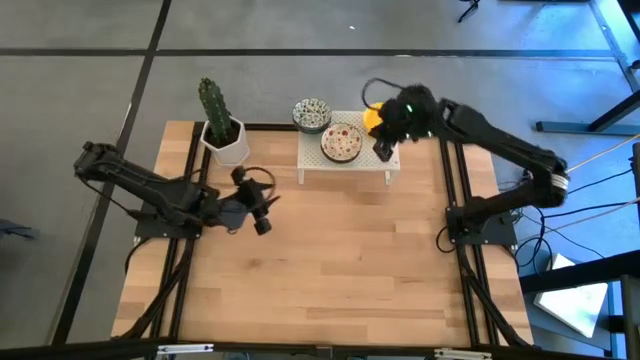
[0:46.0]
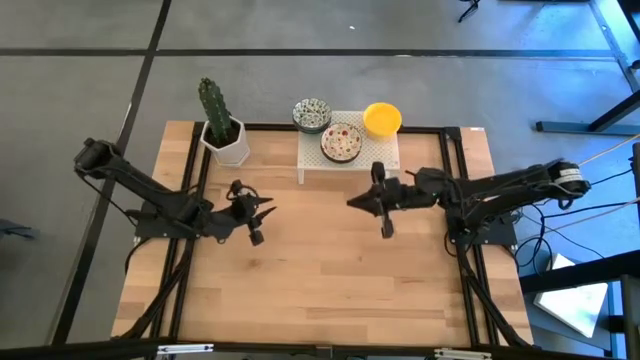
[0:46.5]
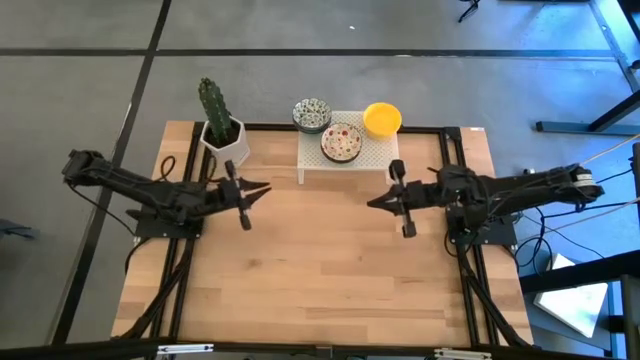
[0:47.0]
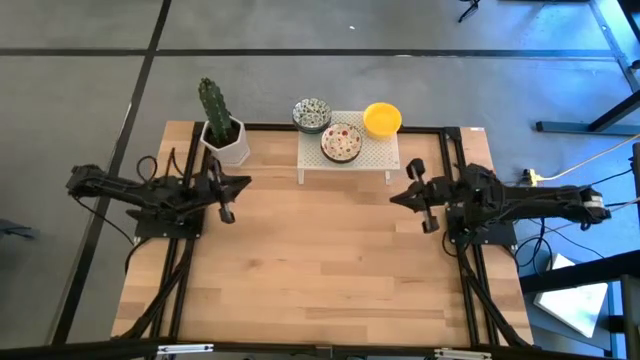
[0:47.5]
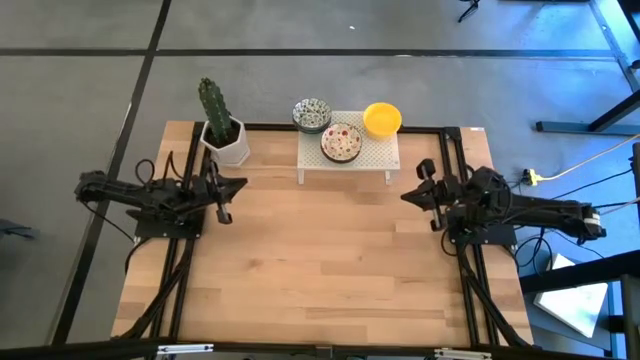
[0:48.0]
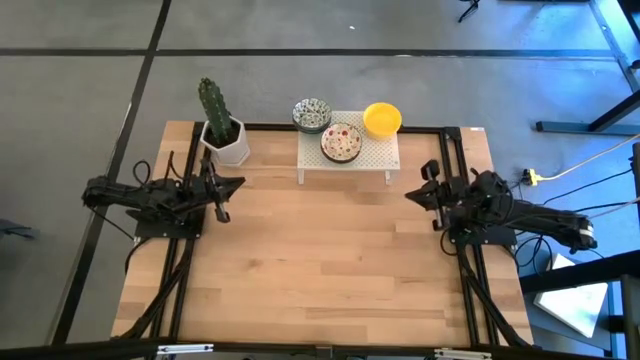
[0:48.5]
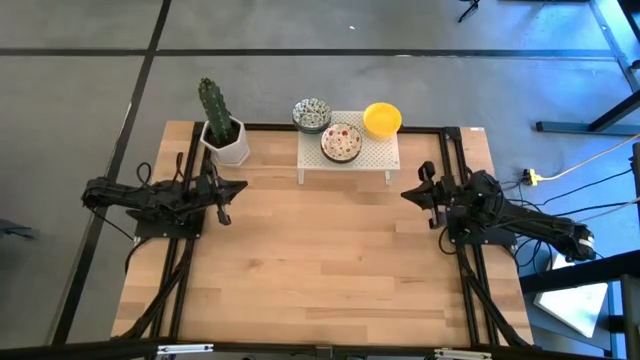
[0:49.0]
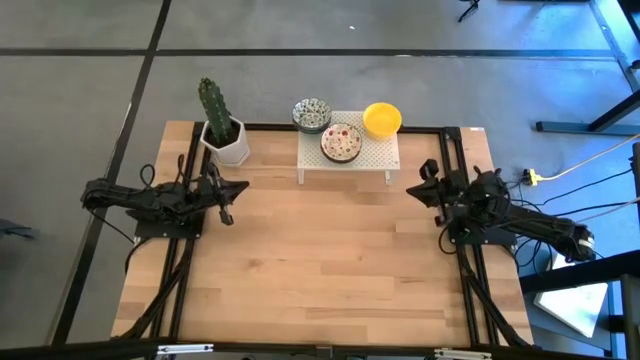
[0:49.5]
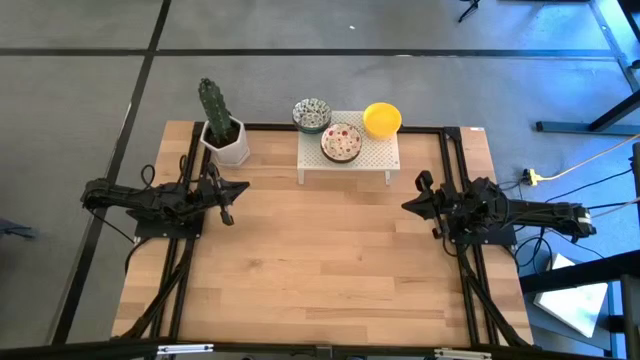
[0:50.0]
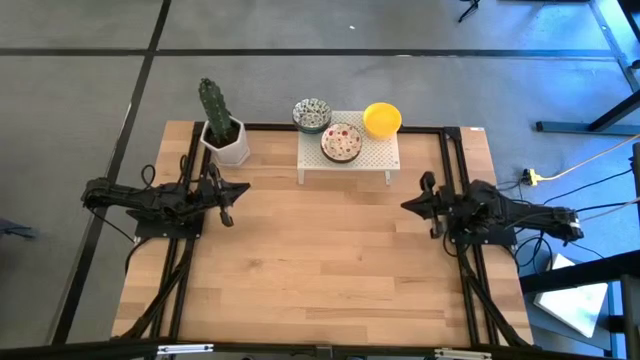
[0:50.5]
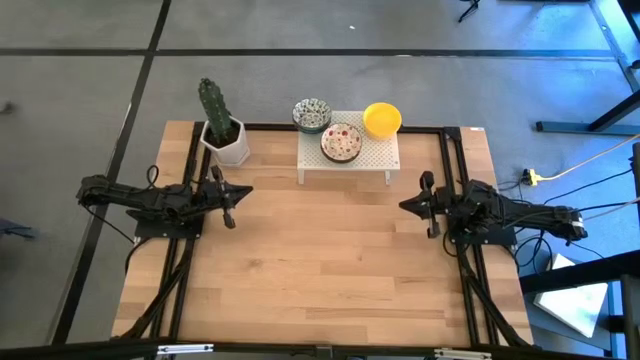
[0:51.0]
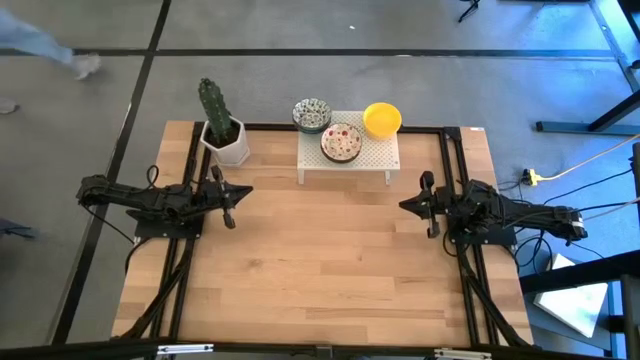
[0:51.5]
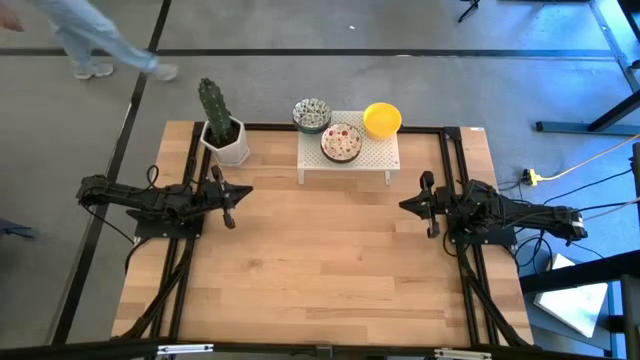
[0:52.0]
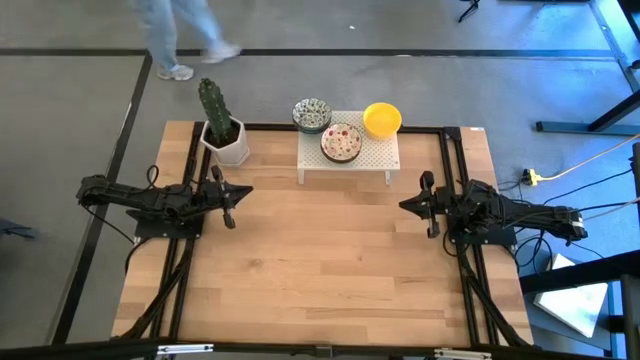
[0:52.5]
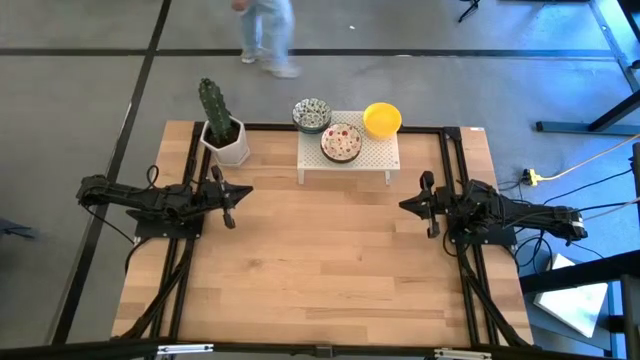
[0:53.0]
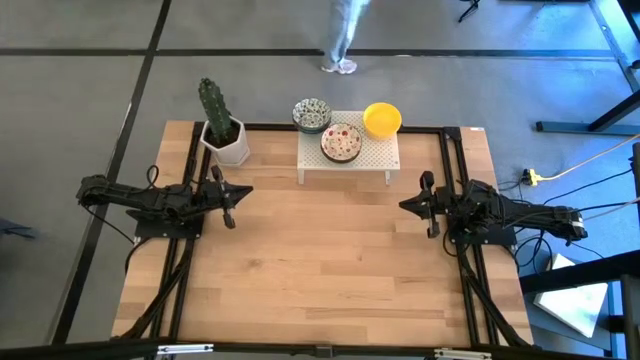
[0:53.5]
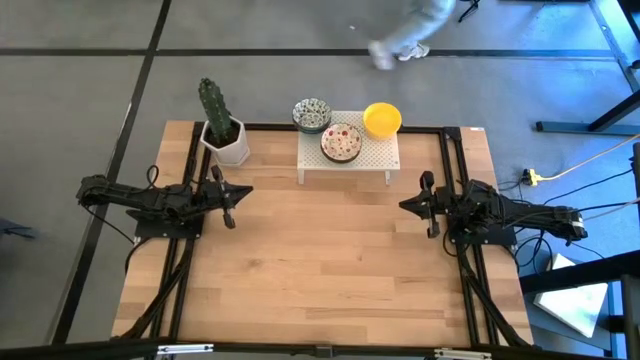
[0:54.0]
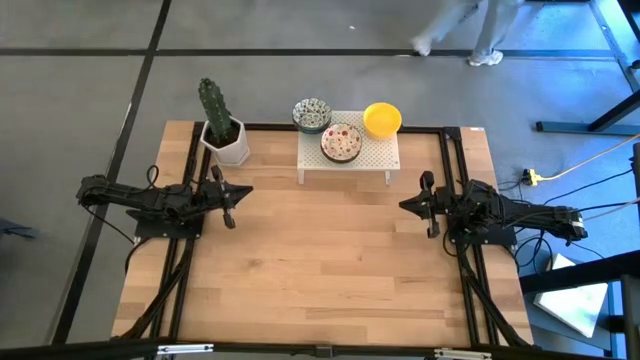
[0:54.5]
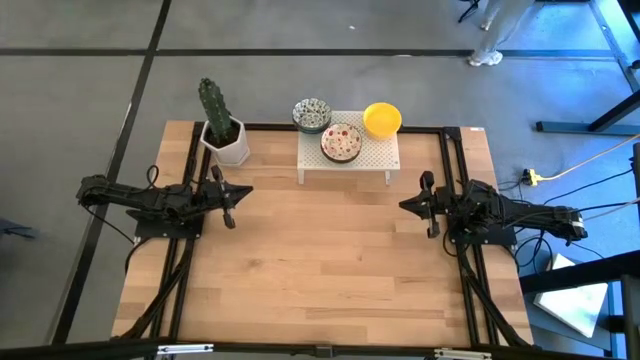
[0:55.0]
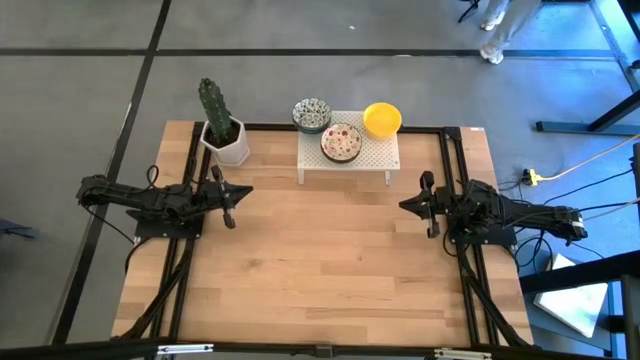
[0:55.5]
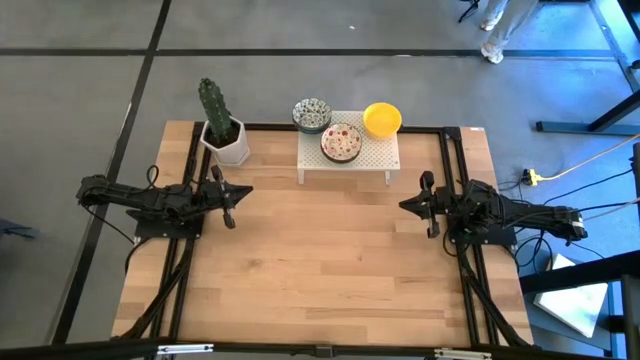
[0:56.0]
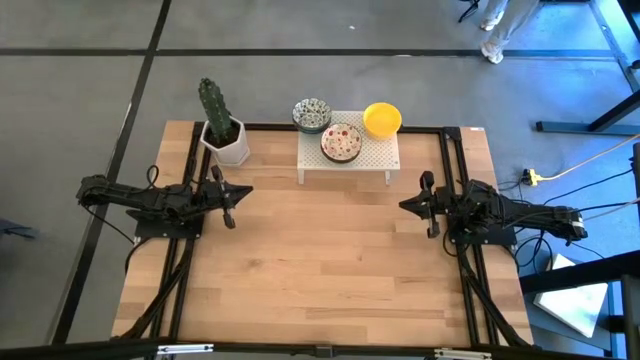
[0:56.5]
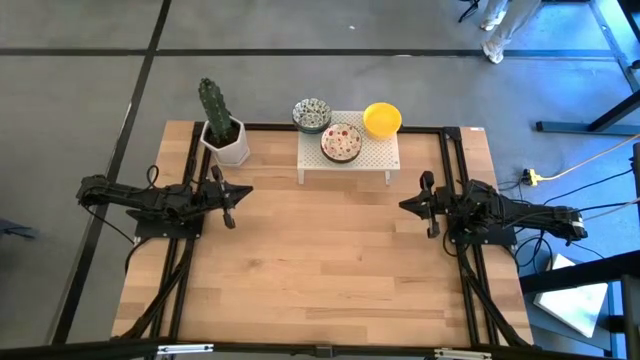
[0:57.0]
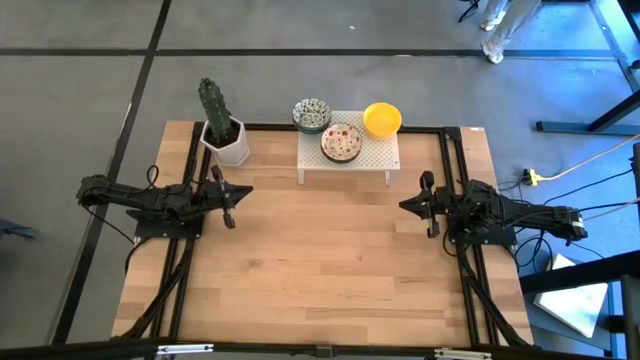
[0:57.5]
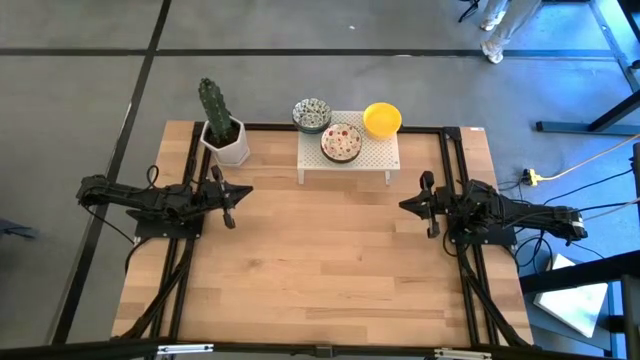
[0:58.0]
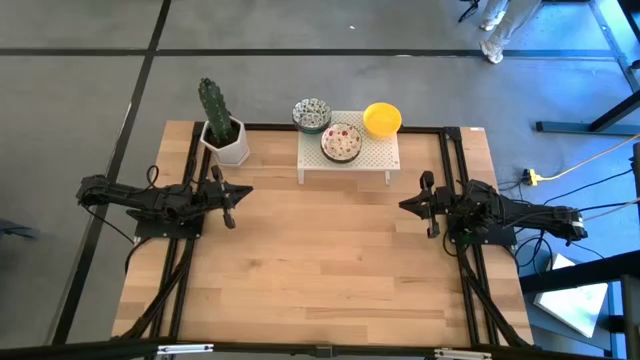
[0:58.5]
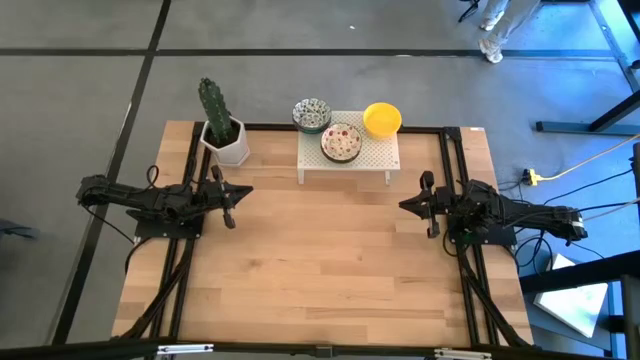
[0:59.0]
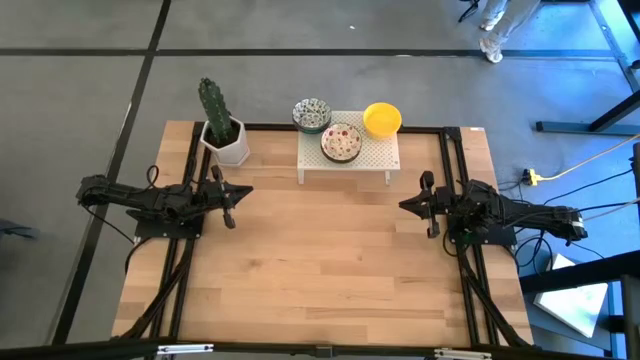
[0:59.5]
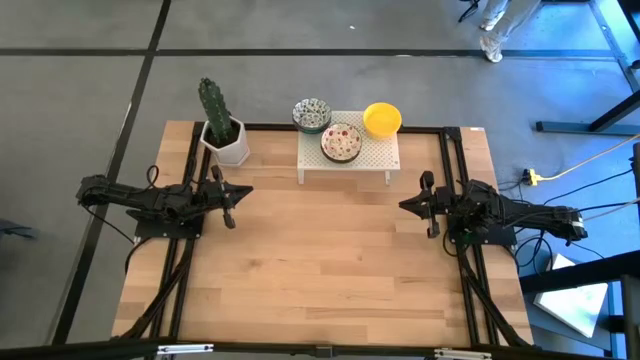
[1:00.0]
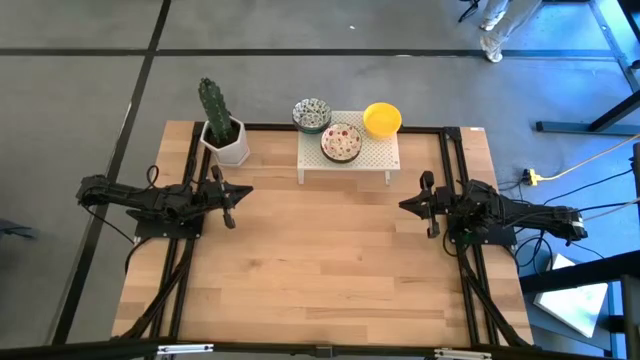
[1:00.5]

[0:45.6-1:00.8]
Task: Pick & Place Mini bowls
Return to Home Position

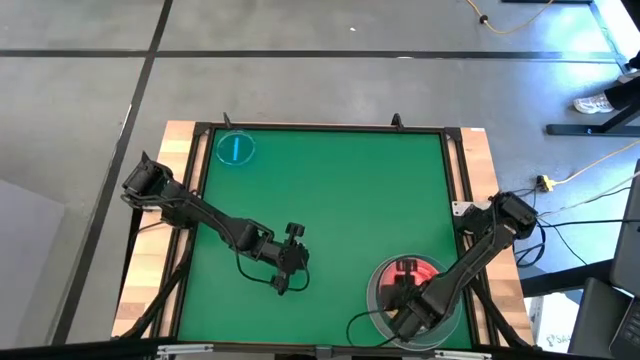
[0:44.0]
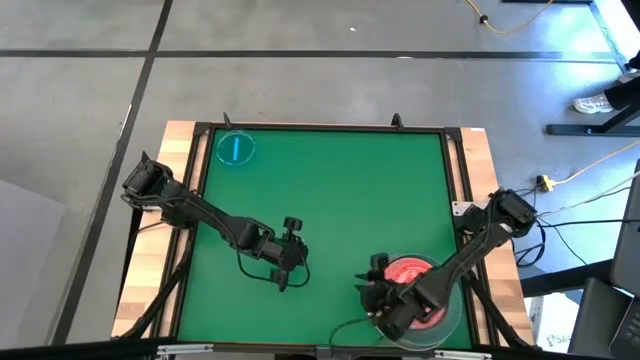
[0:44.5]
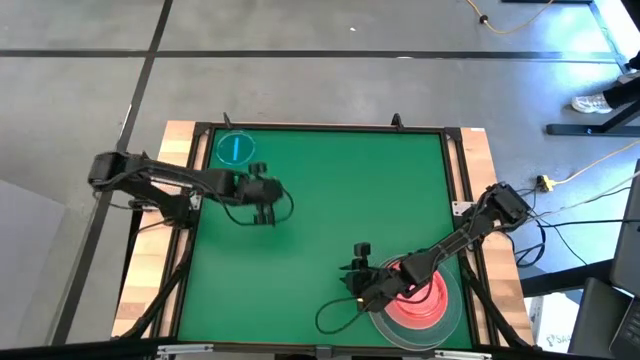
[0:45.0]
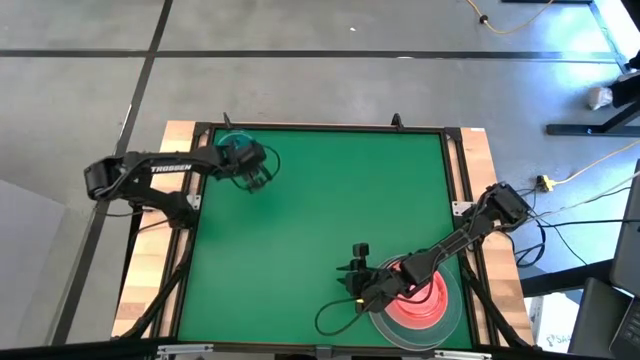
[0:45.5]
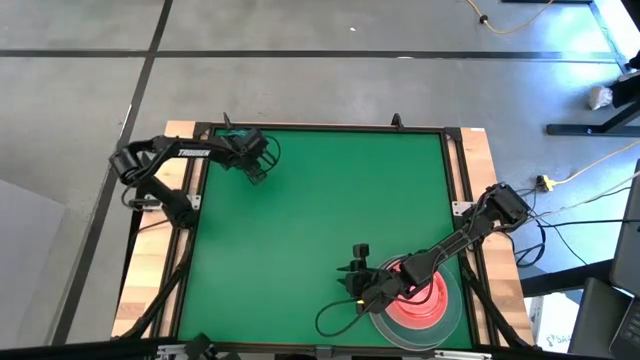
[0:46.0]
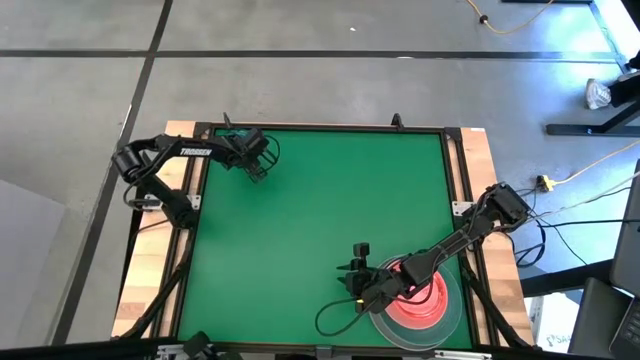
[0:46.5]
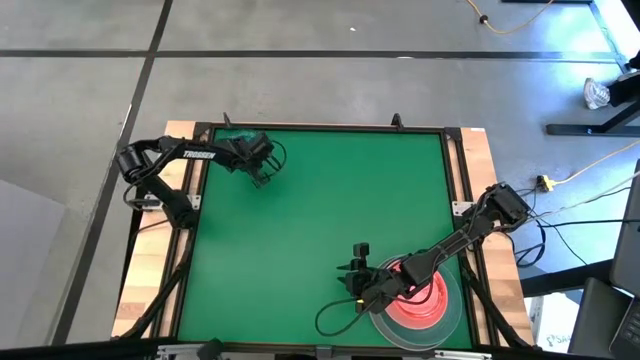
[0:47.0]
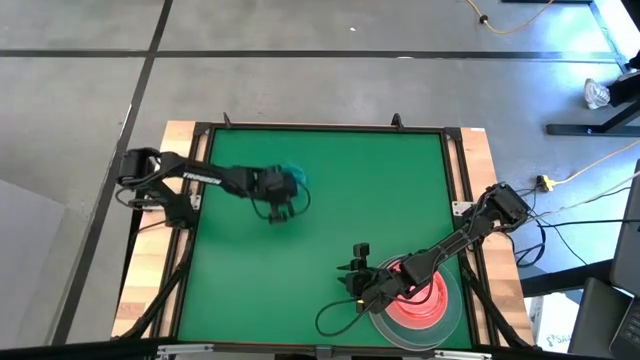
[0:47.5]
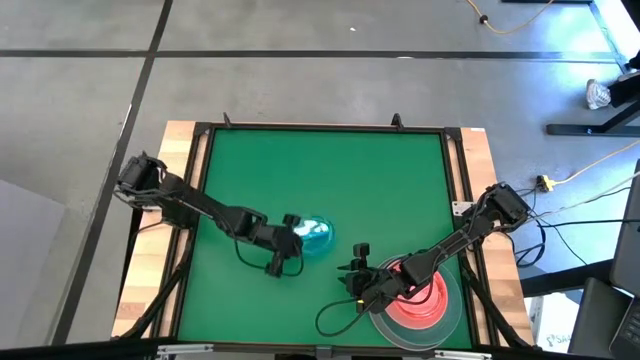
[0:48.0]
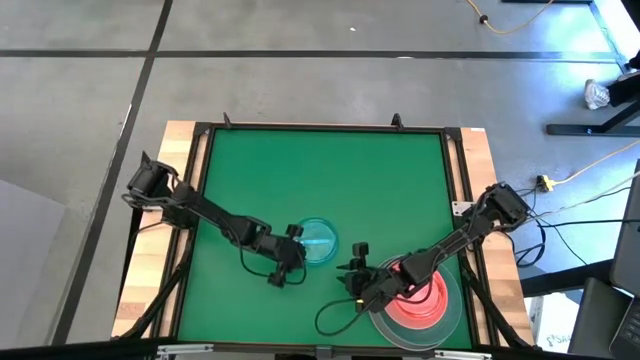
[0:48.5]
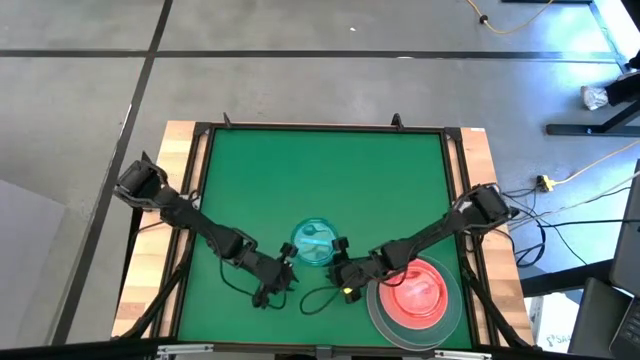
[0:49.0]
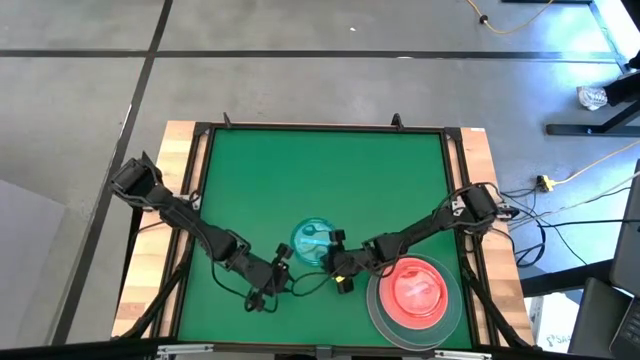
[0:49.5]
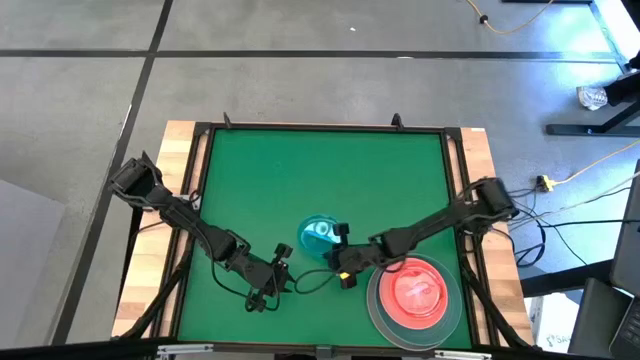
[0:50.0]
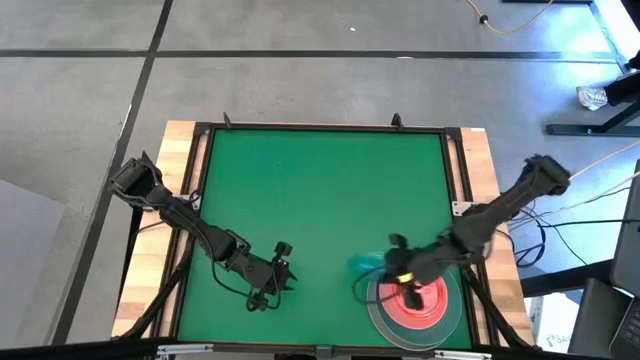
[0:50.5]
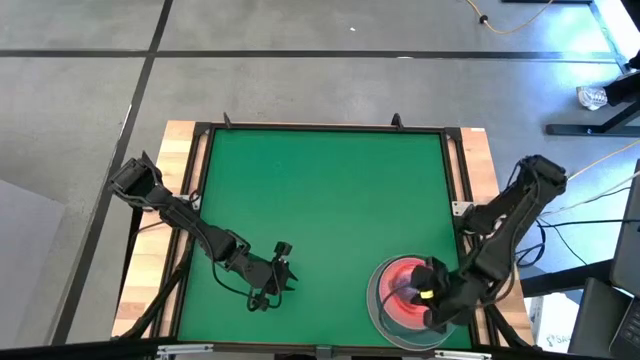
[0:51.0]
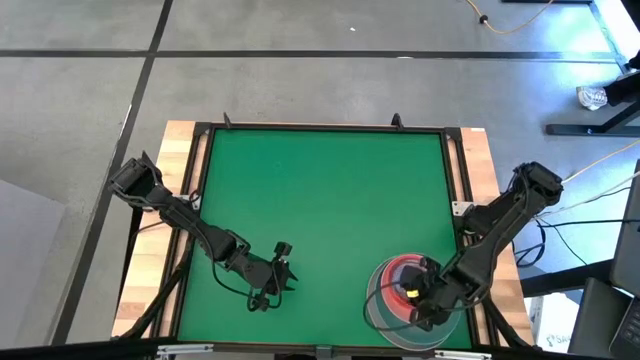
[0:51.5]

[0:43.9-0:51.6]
Task: Stack plastic plates
Stack the transparent blue plate on top of the transparent pink plate
